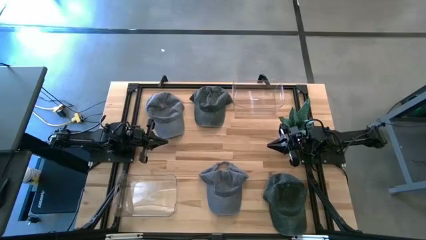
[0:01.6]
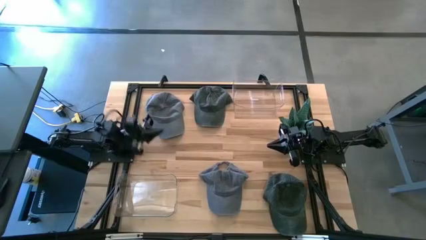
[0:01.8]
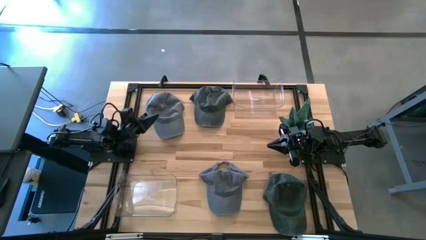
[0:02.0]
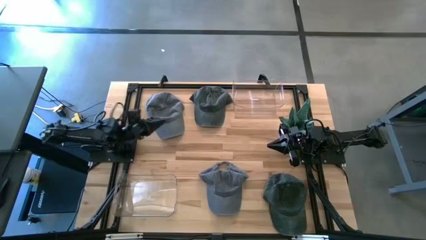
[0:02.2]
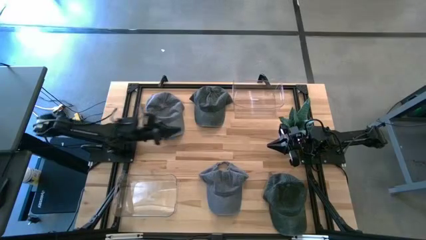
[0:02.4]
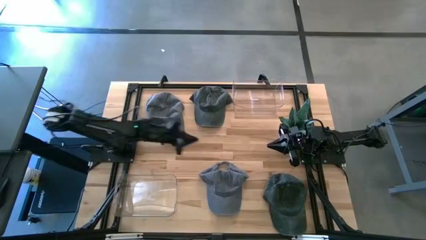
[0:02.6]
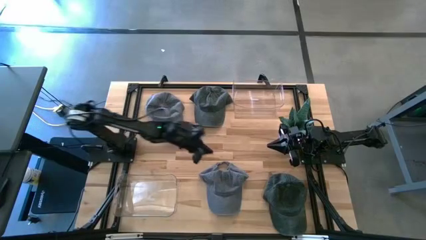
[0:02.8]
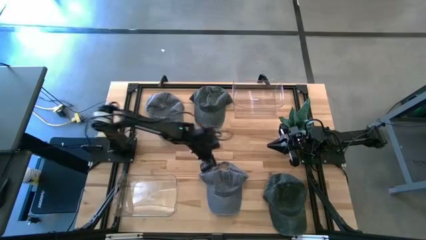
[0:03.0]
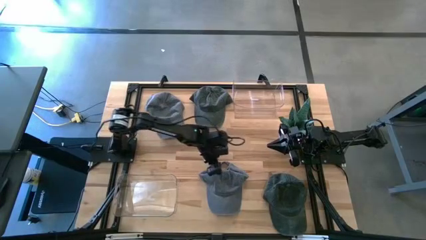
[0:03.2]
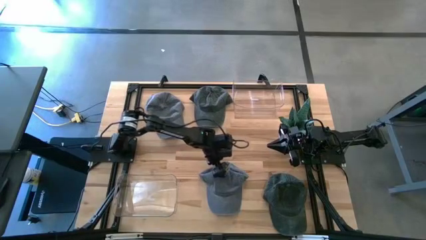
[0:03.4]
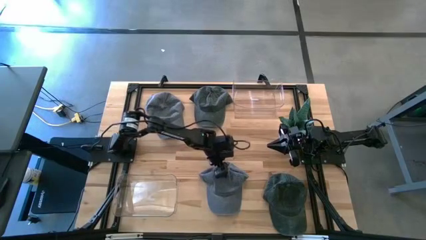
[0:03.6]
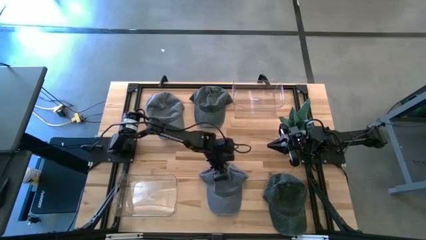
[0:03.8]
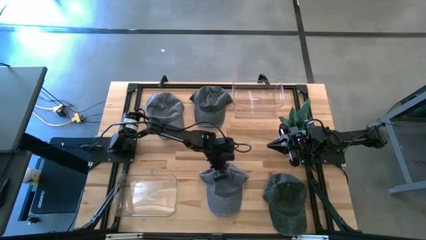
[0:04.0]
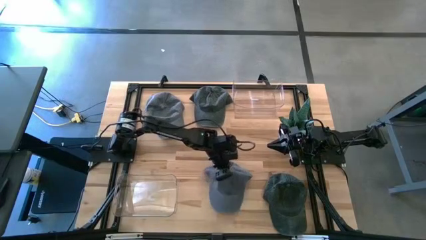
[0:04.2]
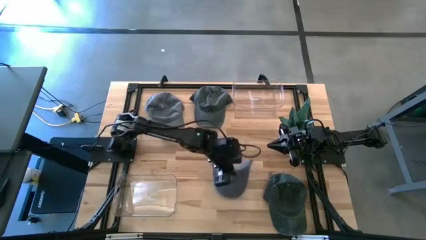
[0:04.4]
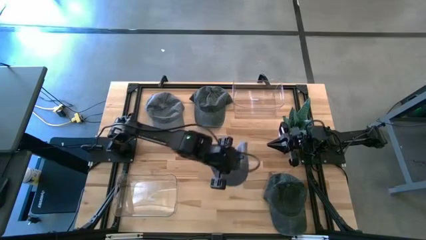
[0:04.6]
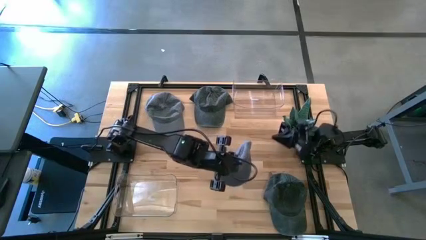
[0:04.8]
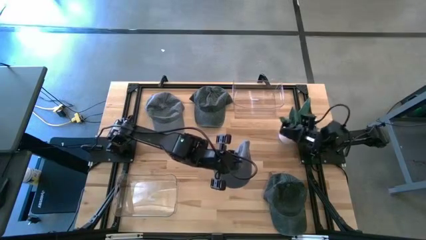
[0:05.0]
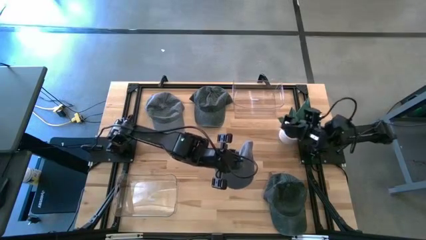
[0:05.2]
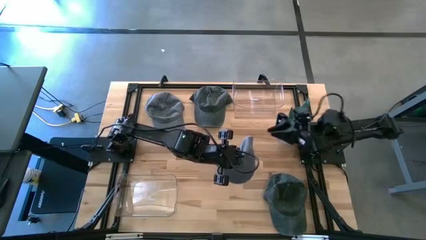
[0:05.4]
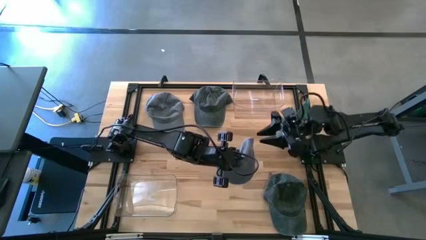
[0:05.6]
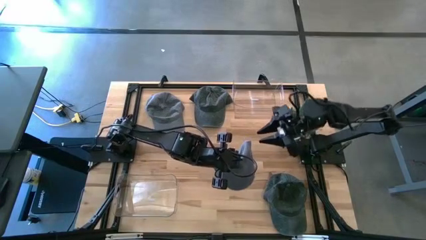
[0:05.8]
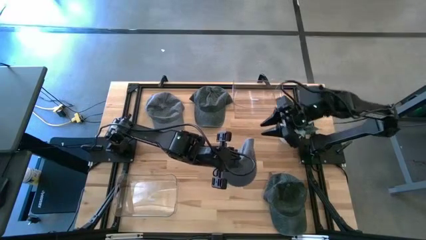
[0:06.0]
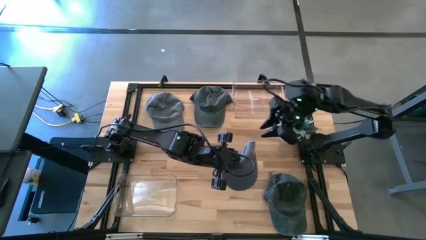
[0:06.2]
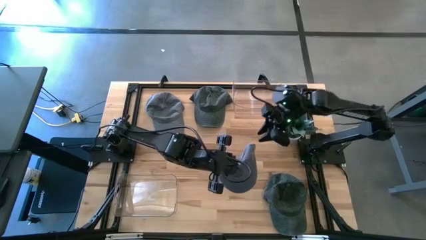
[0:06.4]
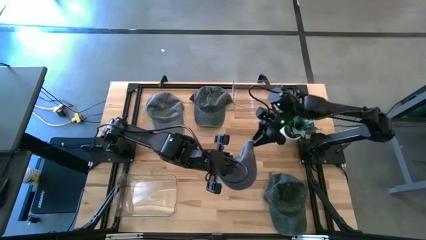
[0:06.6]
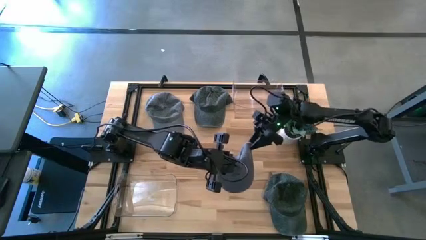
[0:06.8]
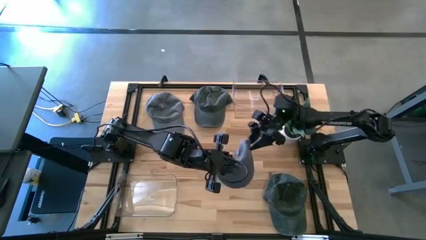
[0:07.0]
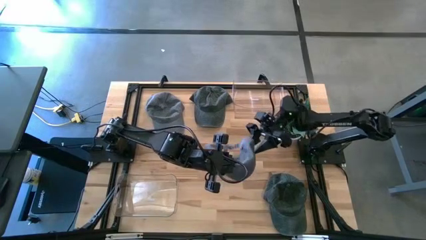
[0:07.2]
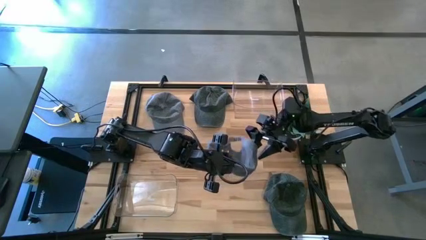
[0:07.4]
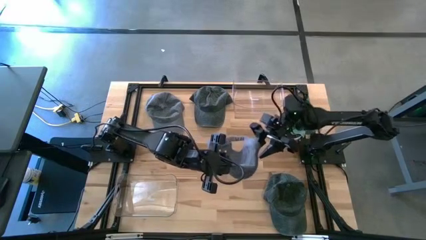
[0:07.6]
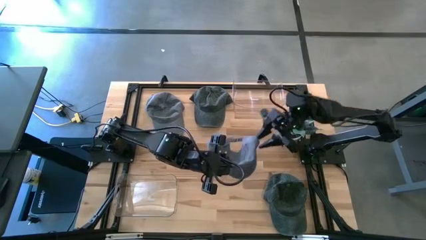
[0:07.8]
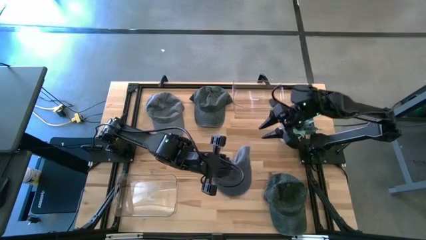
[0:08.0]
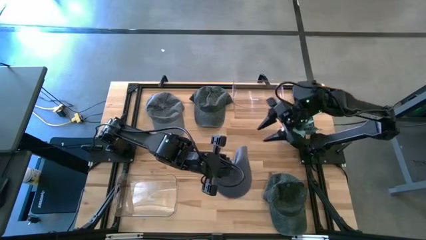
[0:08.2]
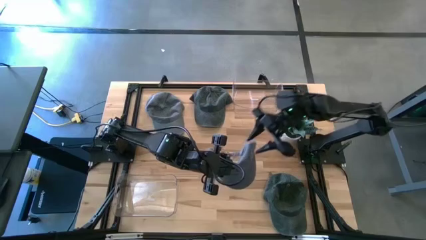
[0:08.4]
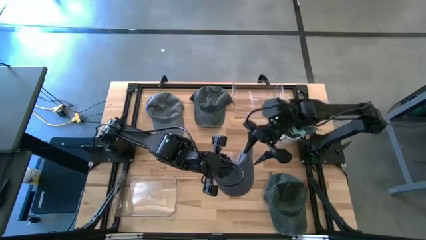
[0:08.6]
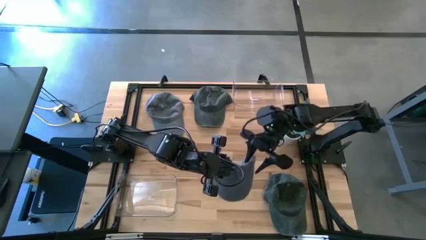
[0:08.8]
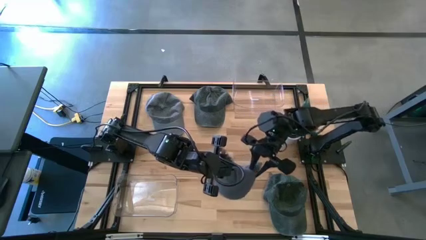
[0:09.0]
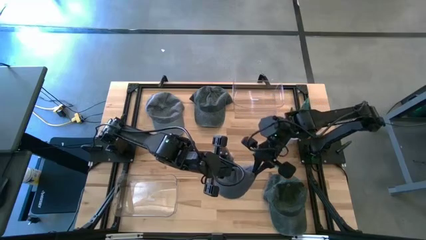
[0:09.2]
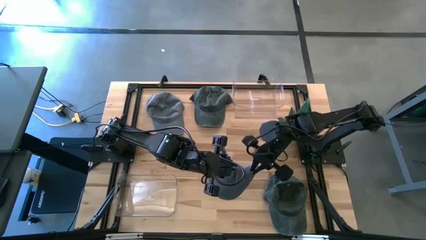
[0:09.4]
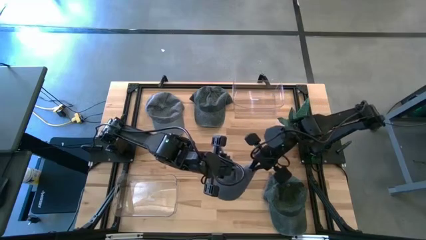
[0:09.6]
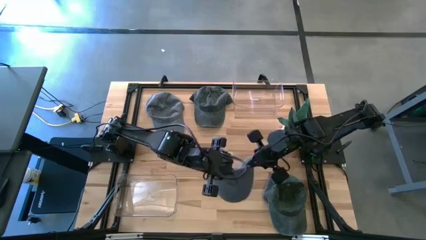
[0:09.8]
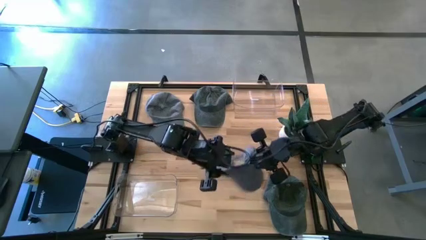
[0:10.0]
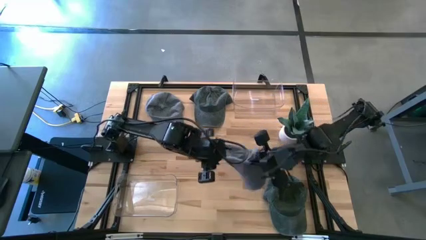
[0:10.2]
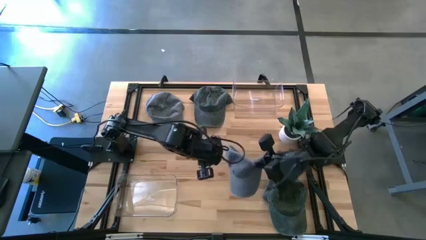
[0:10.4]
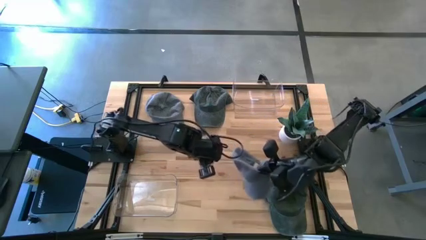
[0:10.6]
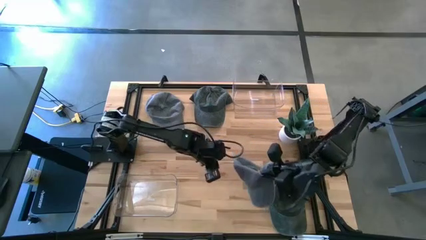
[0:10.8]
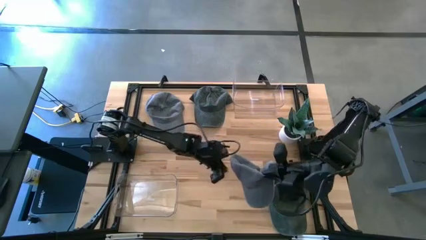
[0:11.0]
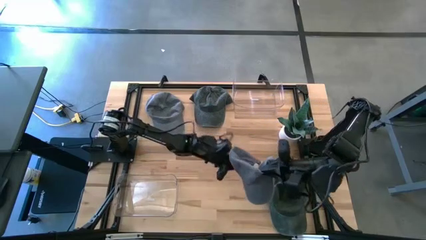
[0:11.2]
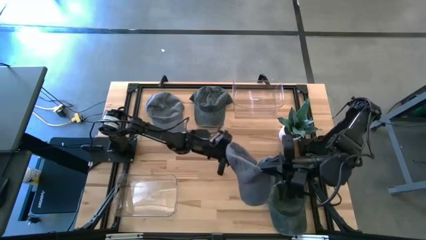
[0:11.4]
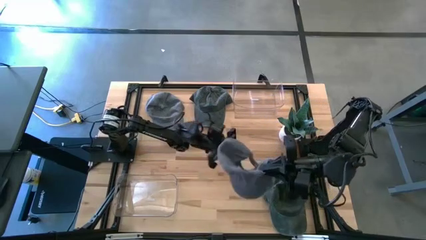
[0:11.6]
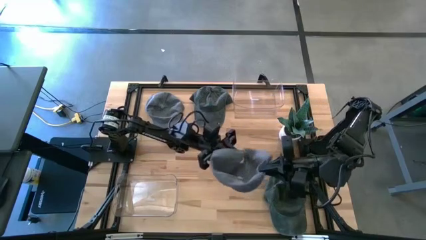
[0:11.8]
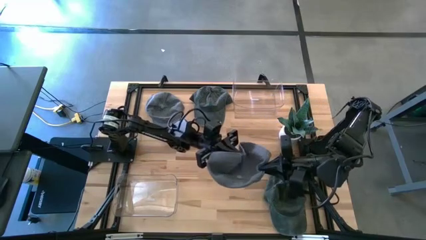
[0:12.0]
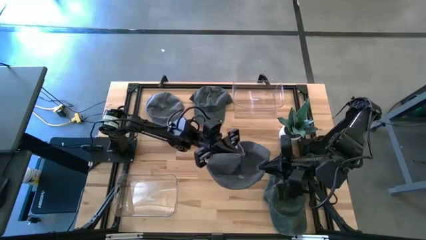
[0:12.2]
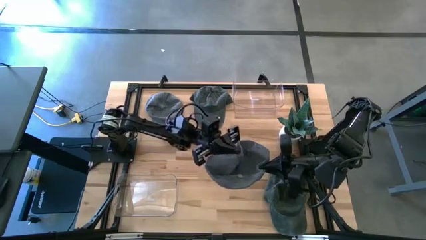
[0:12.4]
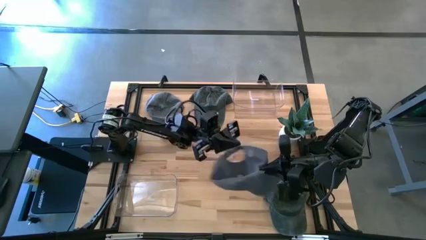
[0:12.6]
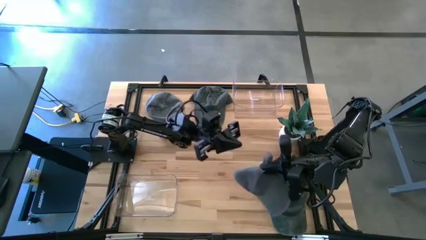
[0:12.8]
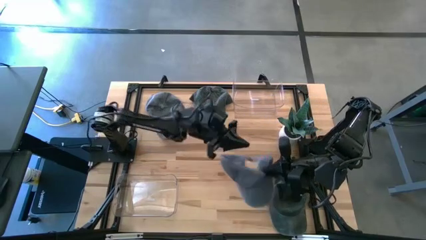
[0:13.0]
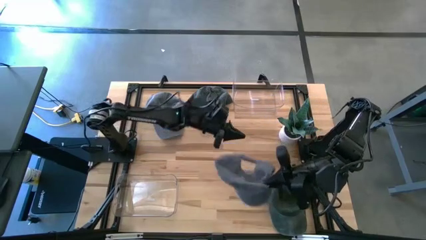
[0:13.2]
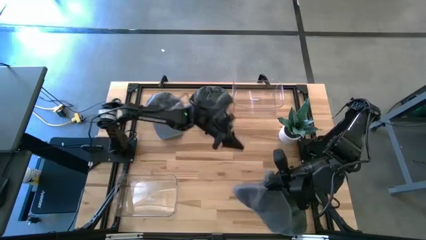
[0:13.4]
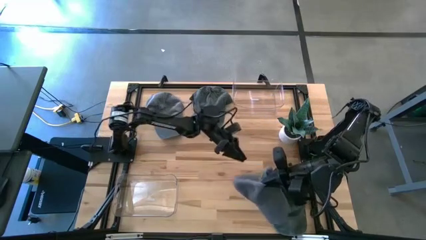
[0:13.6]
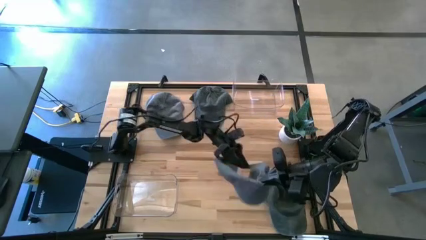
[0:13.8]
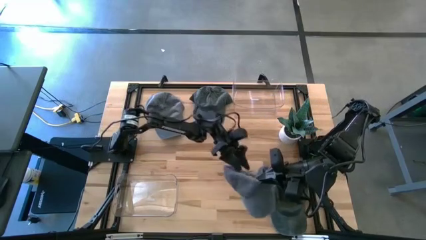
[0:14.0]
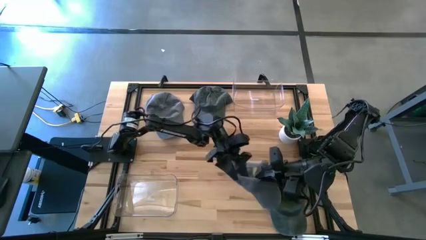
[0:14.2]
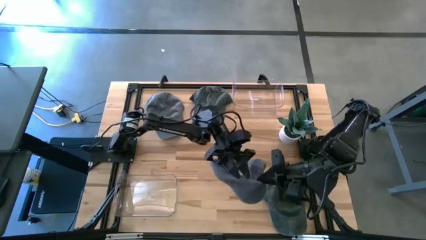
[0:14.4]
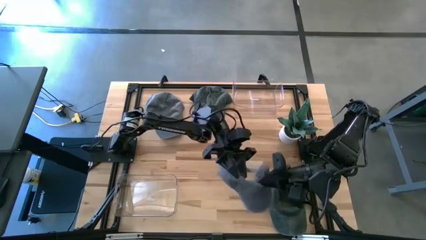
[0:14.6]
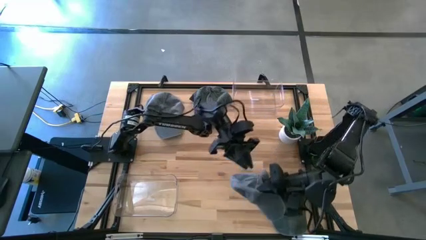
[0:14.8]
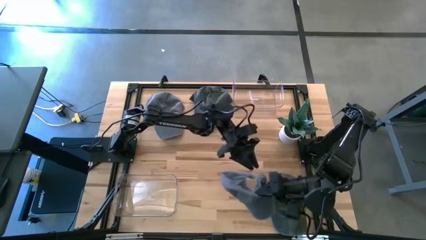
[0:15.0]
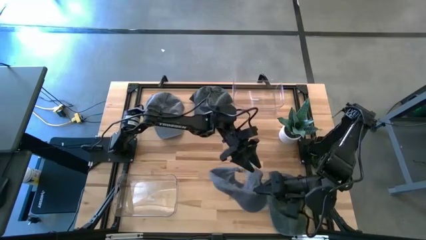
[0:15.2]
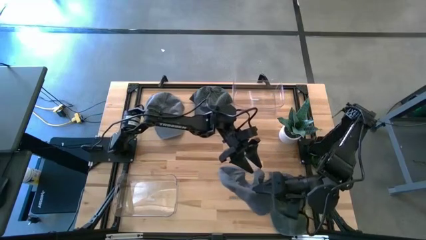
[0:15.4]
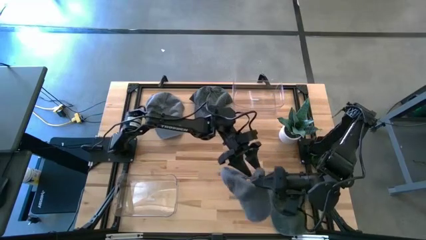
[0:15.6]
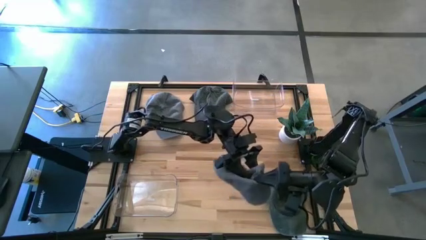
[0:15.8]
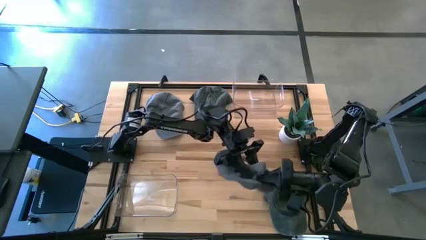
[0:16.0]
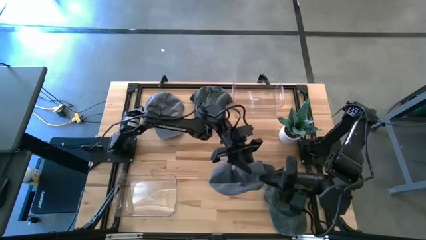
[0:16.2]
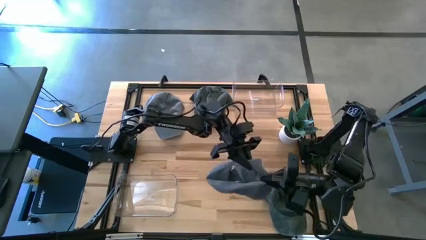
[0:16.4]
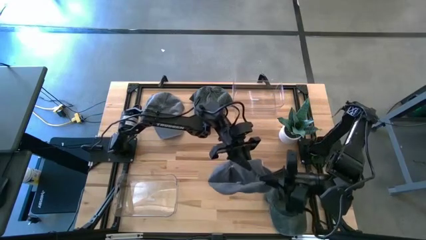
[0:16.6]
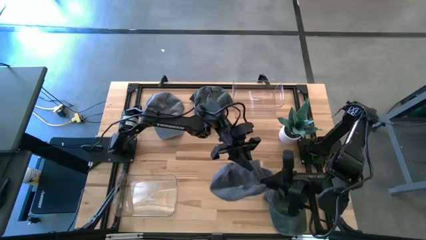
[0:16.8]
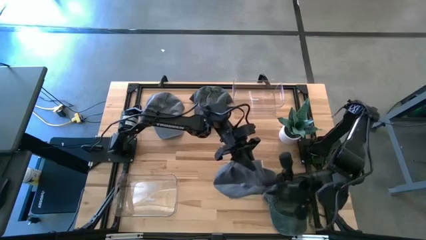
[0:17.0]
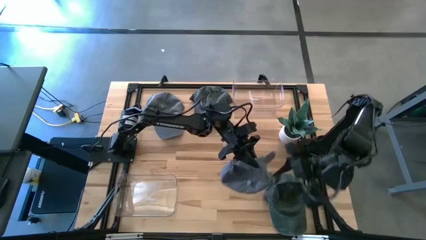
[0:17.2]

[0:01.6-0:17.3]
Task: Pick & Place hat
Put the bottom gray cap into the top transparent bin
